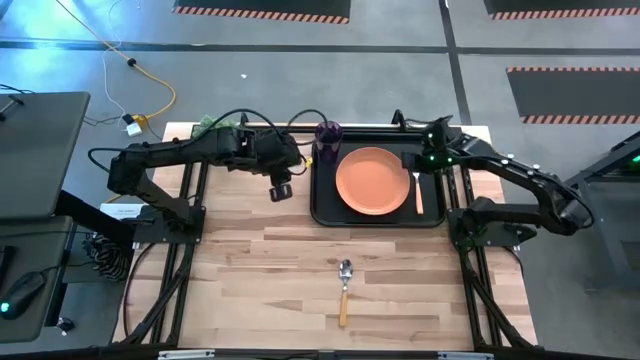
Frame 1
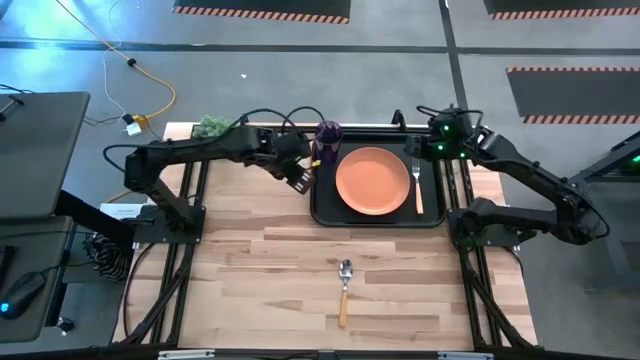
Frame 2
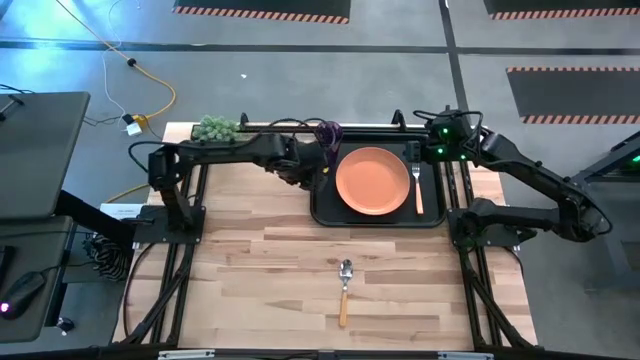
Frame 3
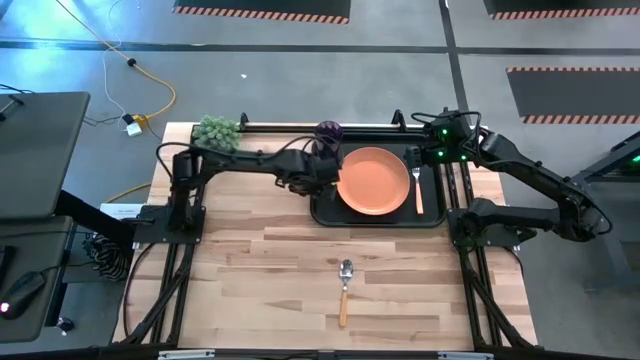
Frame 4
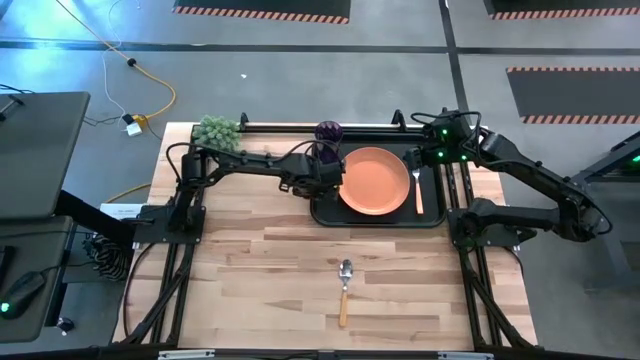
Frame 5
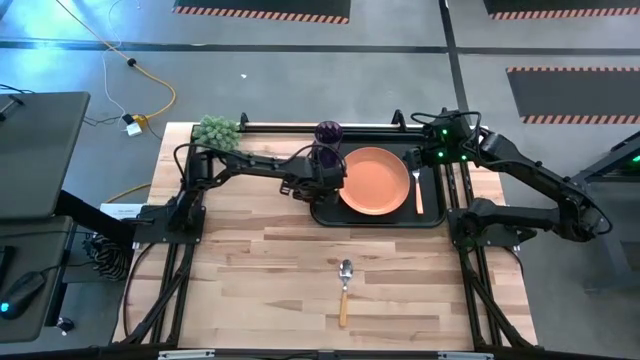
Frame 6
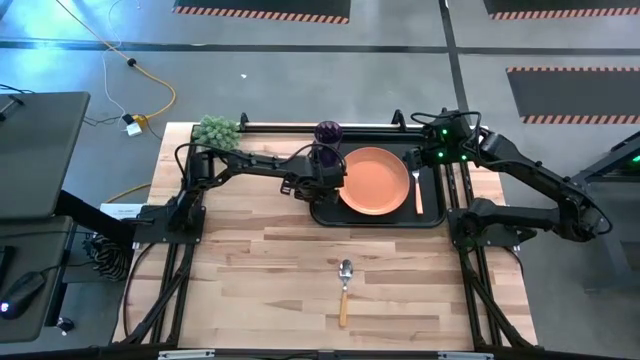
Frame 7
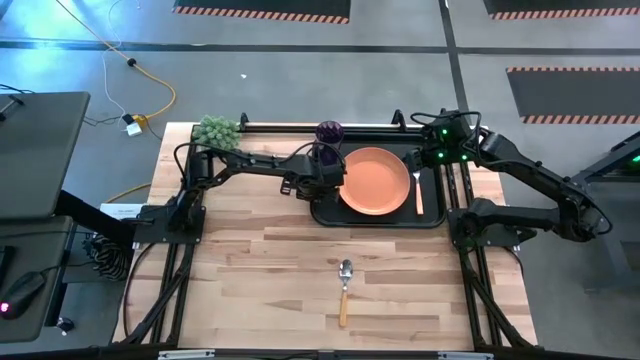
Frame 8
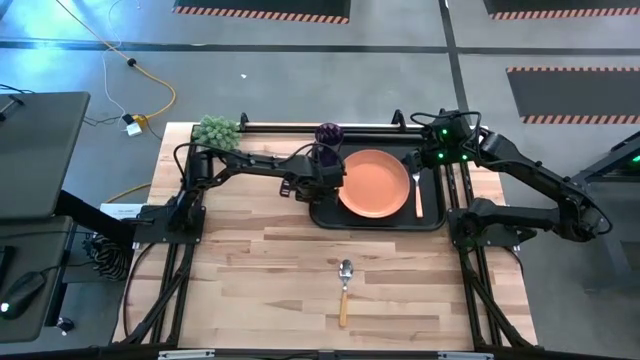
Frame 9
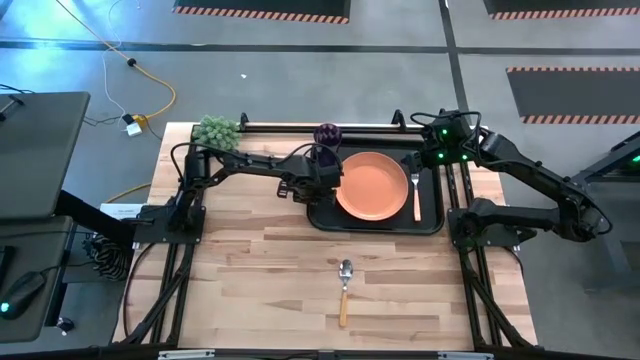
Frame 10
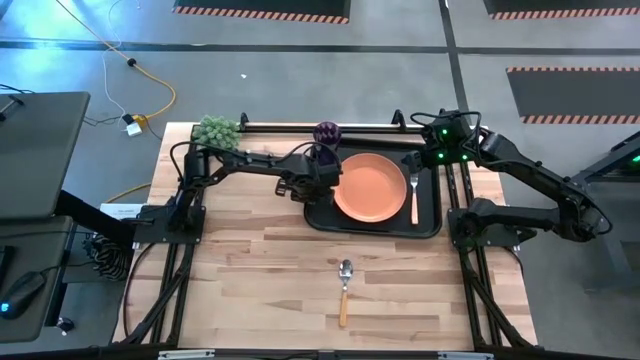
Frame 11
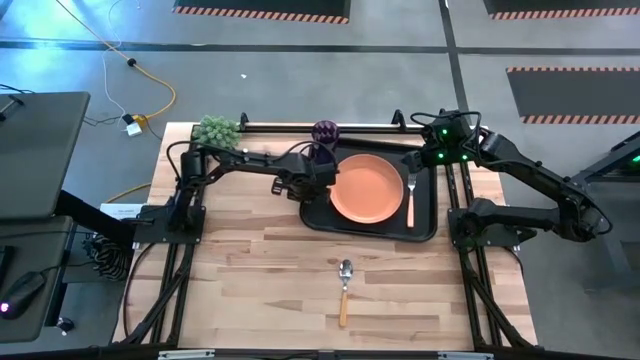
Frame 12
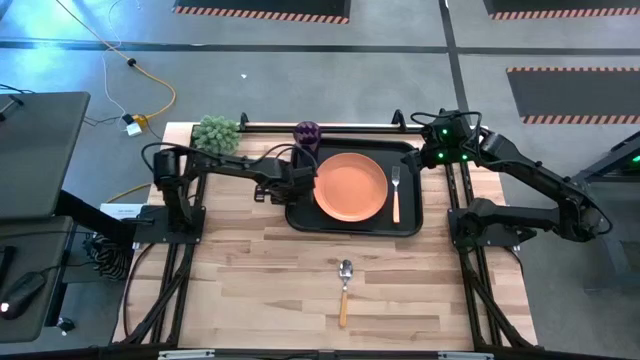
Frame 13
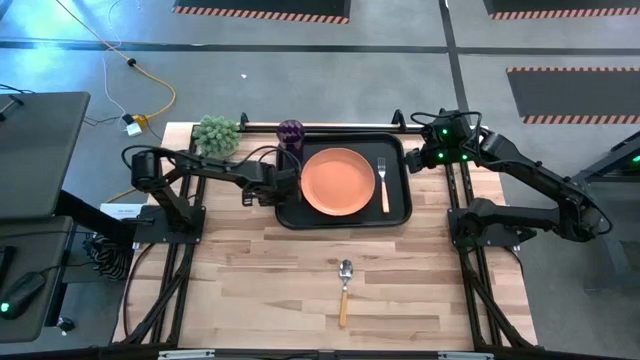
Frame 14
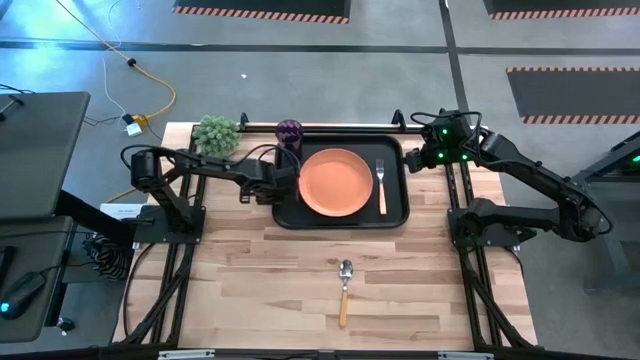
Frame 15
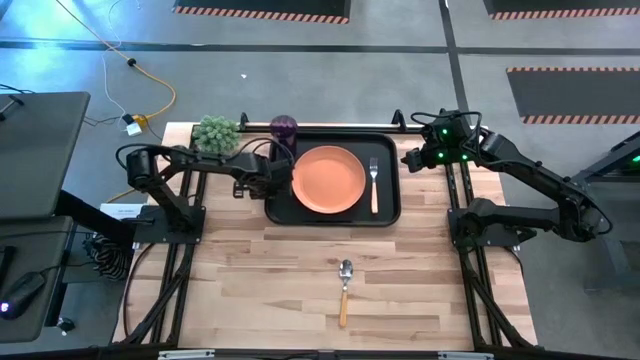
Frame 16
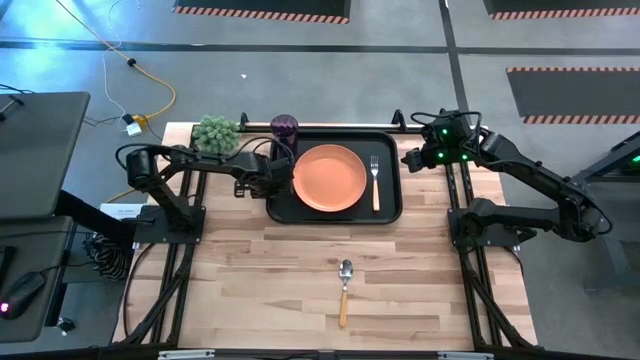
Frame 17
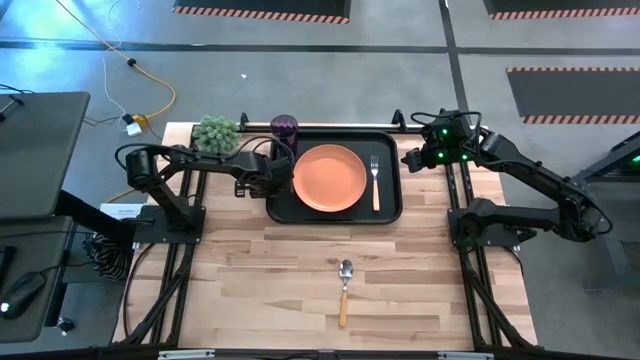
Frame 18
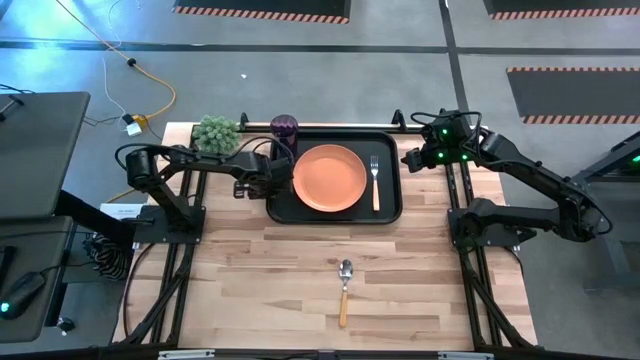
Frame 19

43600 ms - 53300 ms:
Task: Pick and place plate/cup/fork/spoon on tray
Adjust the black serving tray to the top center of the table

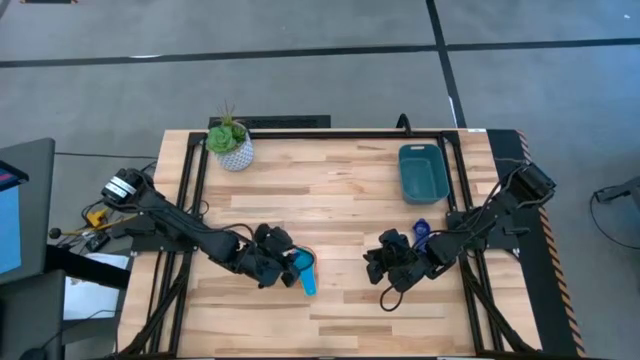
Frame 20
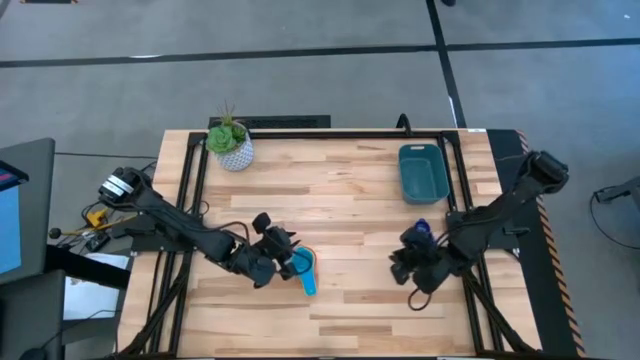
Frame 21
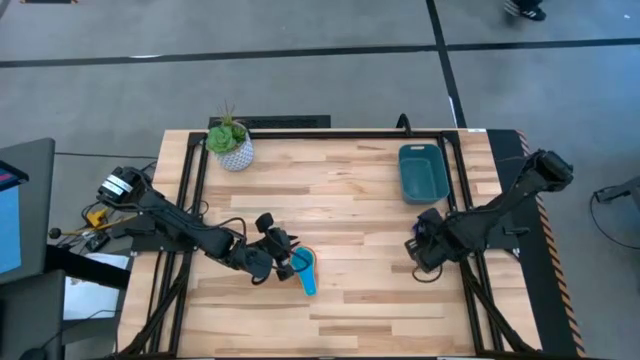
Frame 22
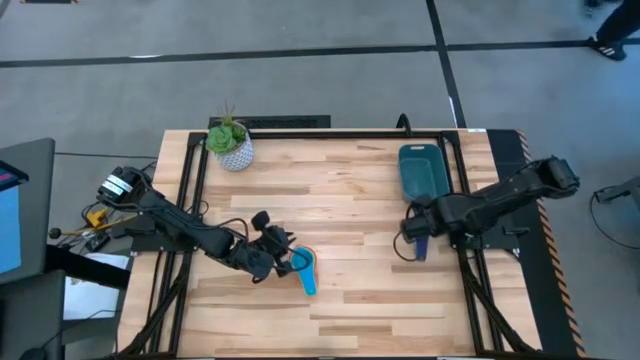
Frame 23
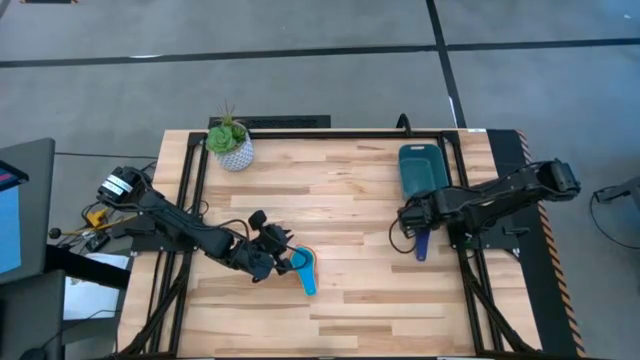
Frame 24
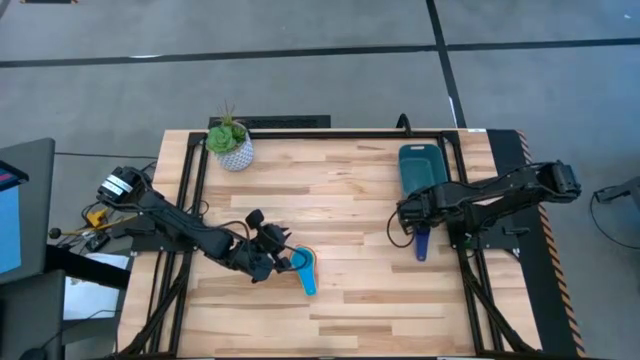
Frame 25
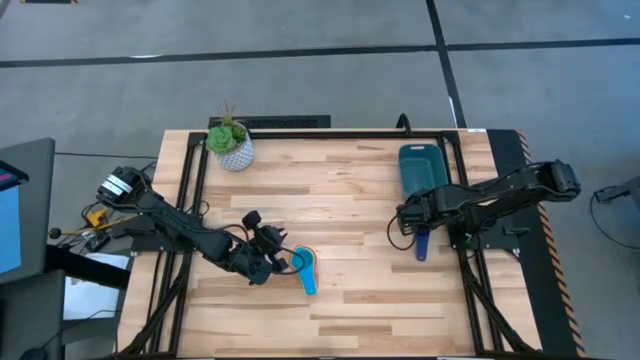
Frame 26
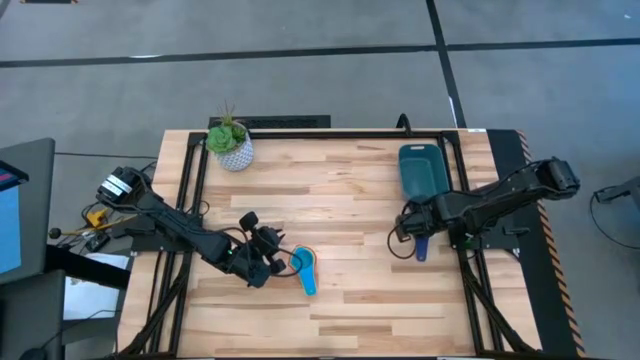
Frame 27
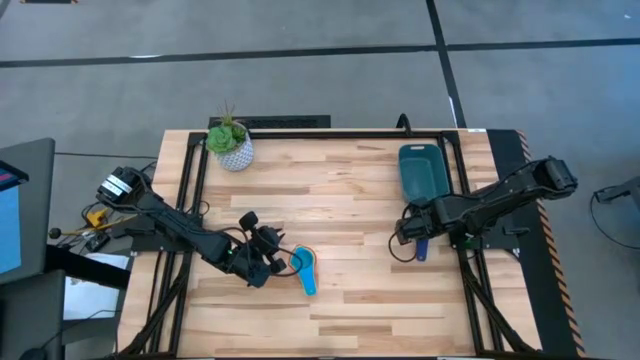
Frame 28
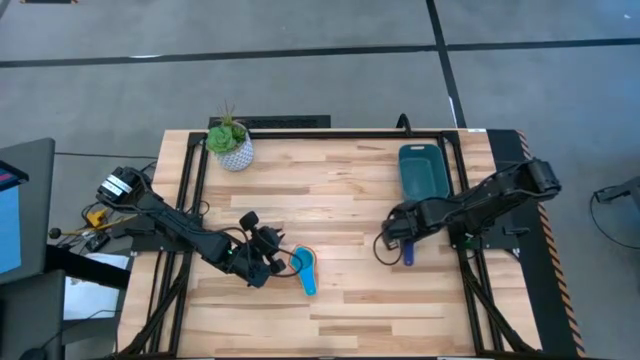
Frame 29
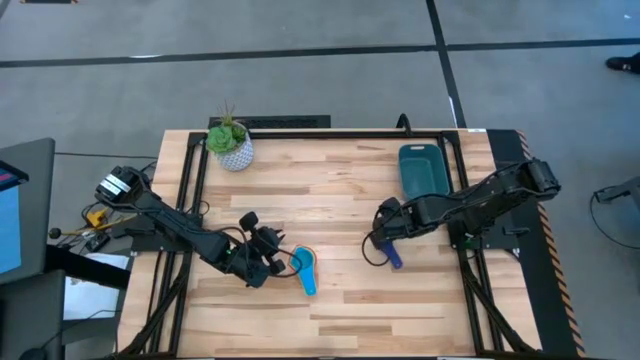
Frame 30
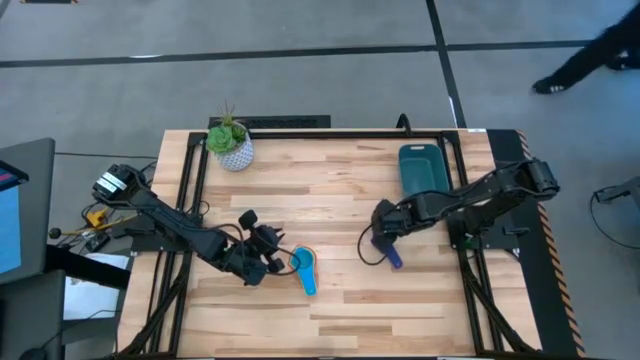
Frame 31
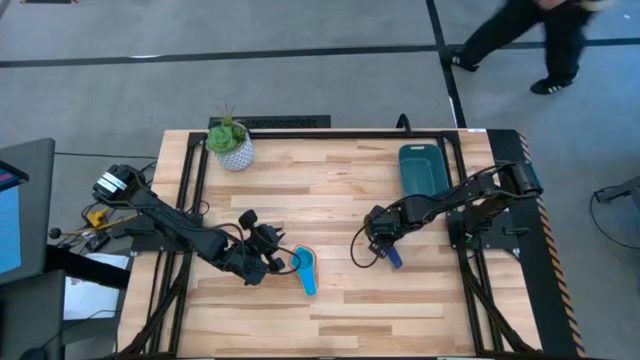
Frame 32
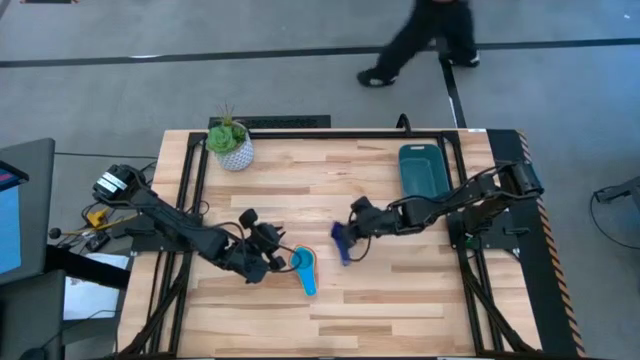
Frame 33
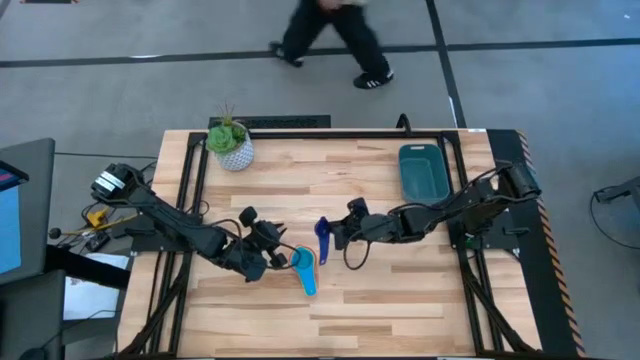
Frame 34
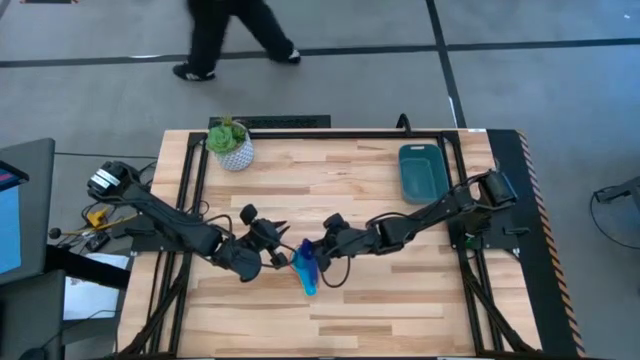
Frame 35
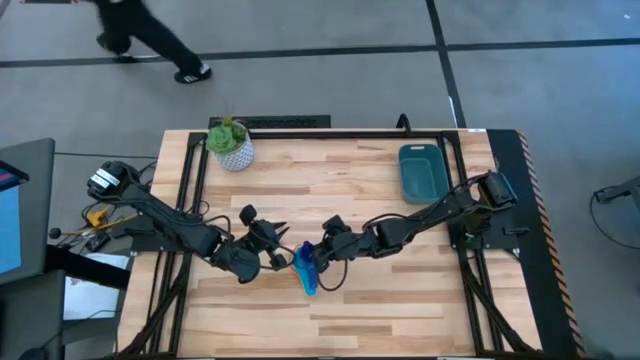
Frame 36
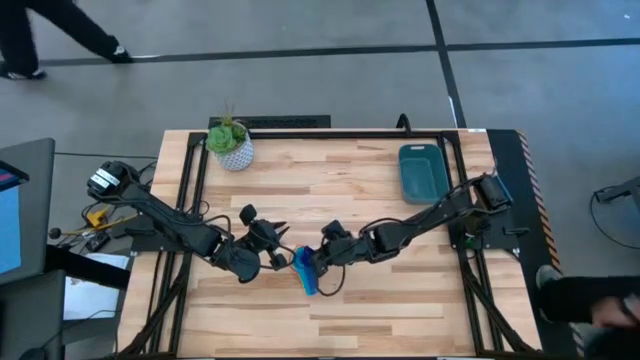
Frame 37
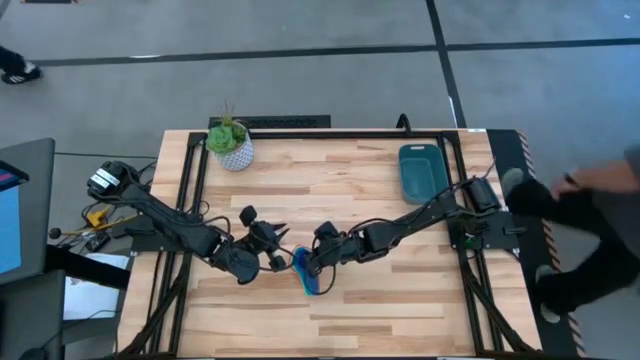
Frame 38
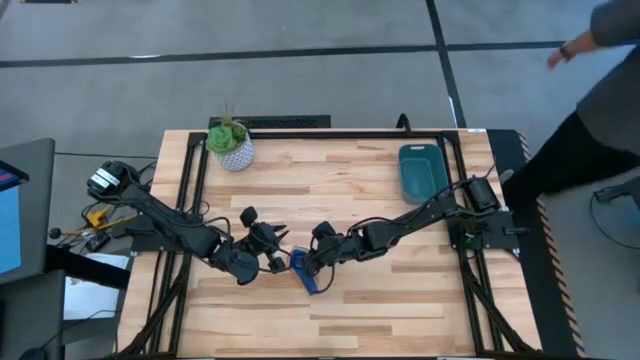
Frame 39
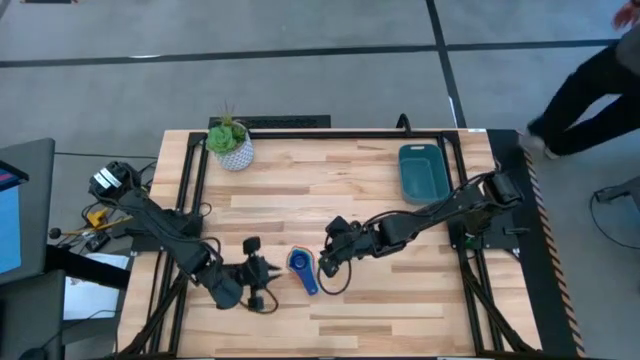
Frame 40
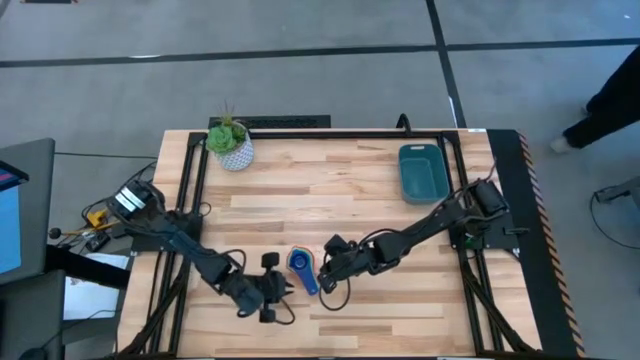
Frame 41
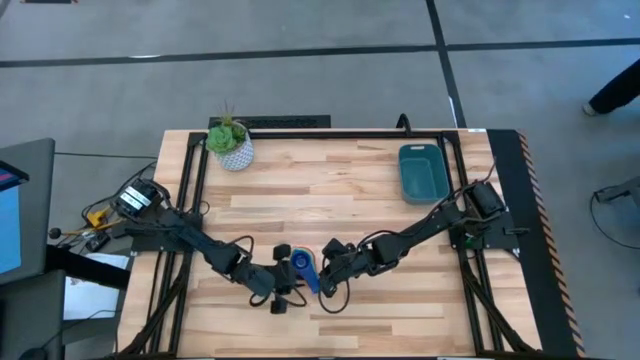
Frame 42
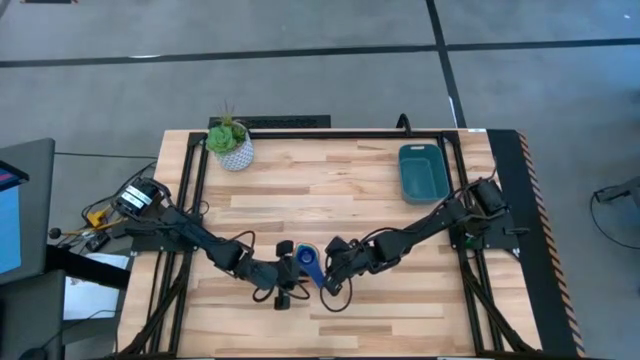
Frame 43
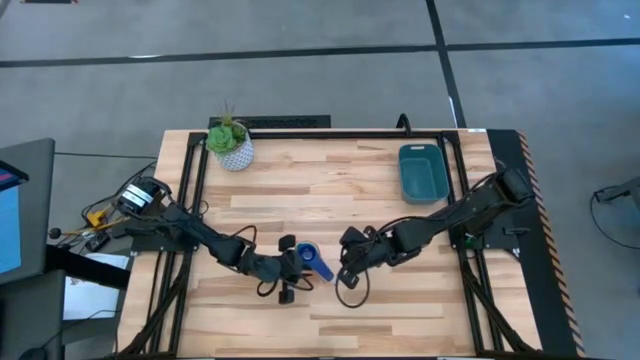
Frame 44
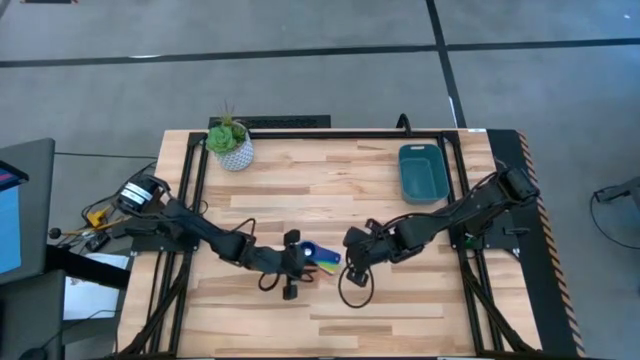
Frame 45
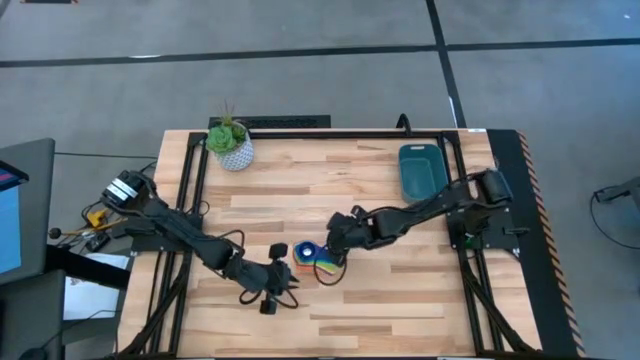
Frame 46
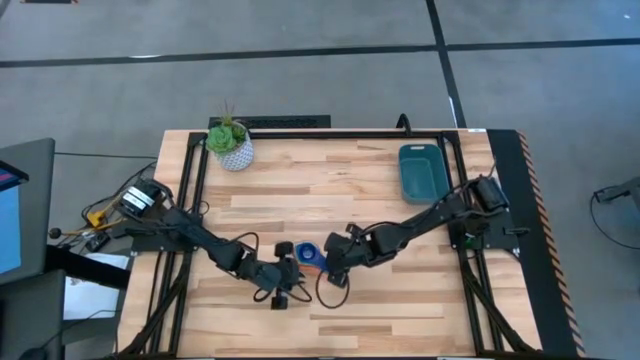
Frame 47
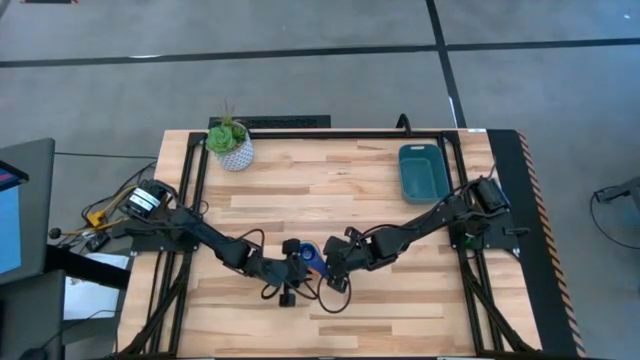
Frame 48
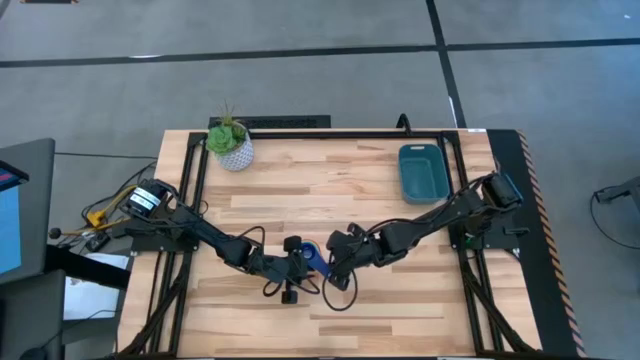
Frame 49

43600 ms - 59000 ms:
Task: Nest measuring cups in basket
Stack the dark blue measuring cup into the light blue measuring cup
